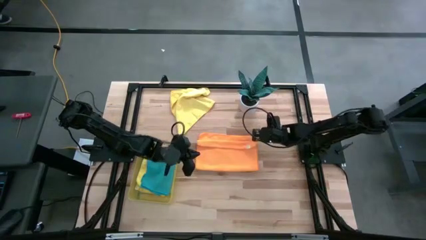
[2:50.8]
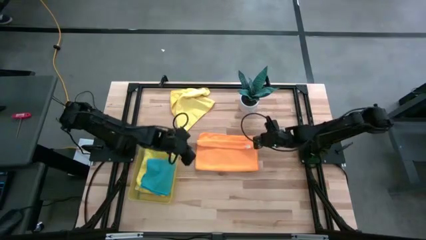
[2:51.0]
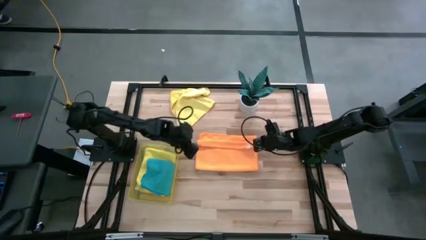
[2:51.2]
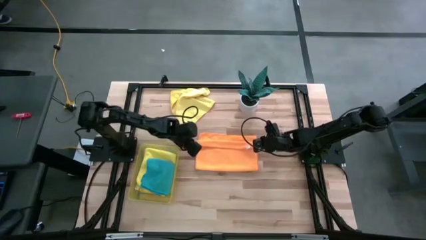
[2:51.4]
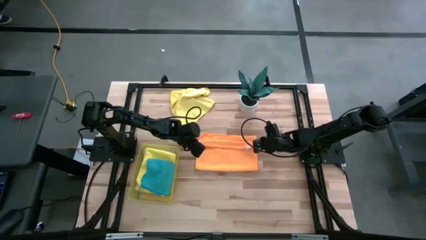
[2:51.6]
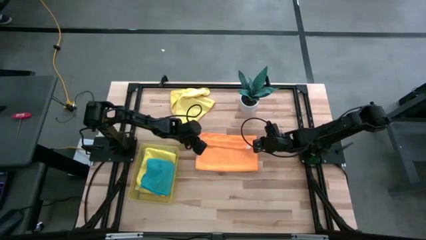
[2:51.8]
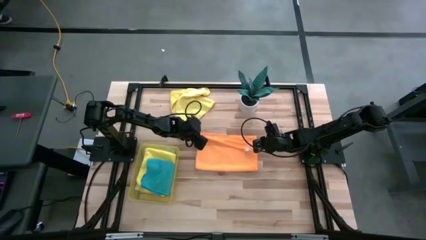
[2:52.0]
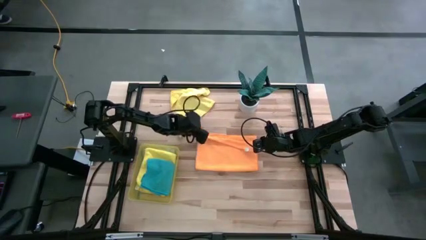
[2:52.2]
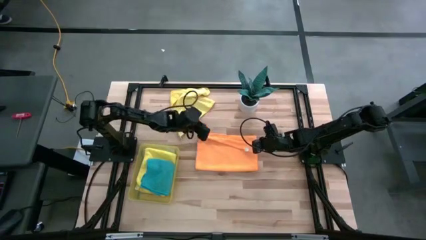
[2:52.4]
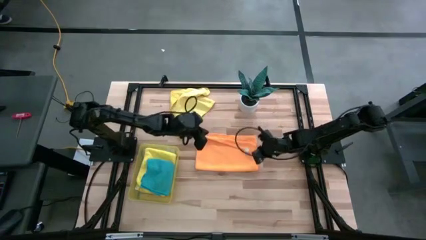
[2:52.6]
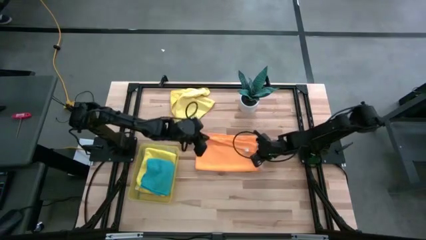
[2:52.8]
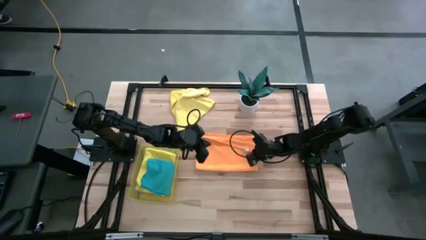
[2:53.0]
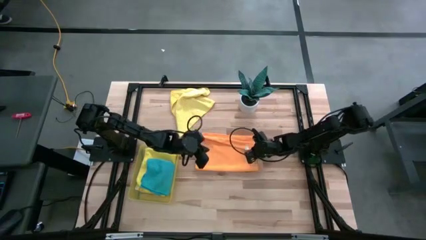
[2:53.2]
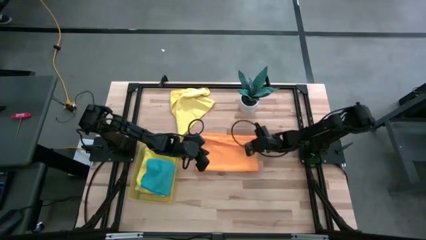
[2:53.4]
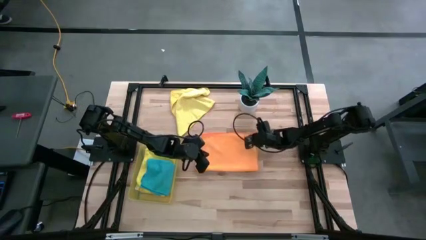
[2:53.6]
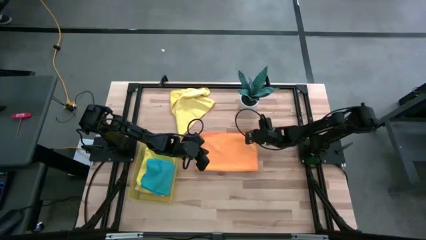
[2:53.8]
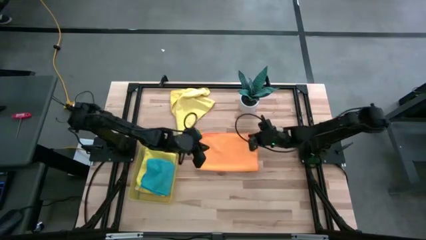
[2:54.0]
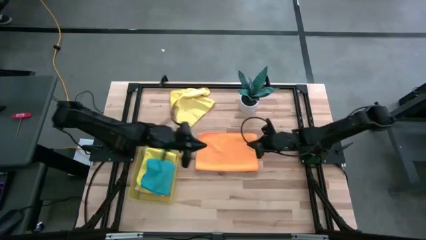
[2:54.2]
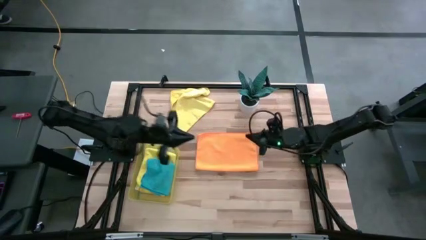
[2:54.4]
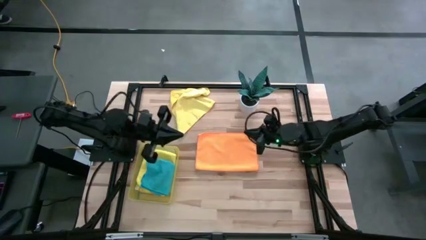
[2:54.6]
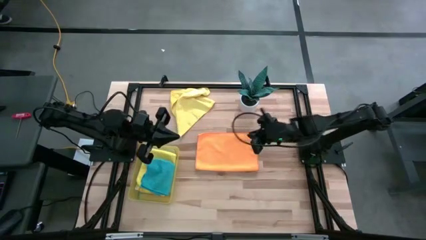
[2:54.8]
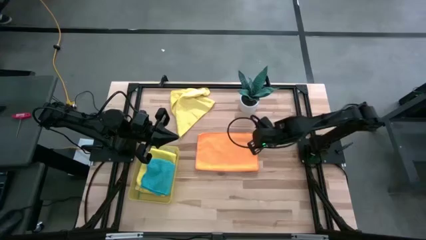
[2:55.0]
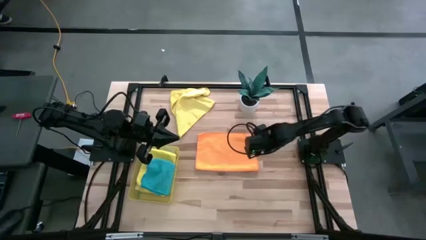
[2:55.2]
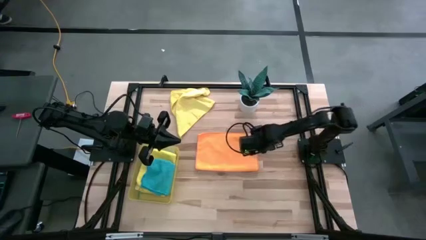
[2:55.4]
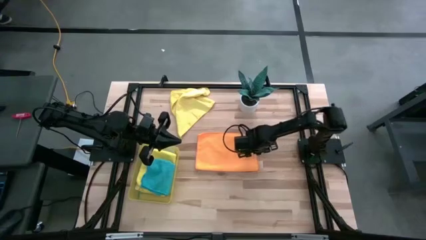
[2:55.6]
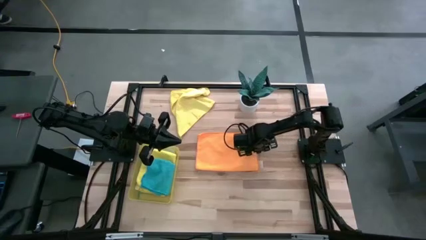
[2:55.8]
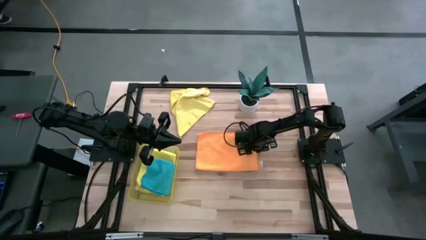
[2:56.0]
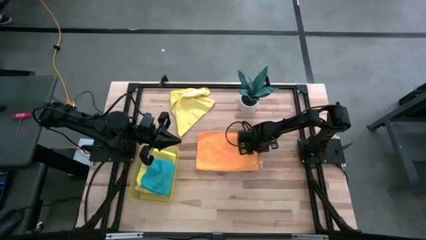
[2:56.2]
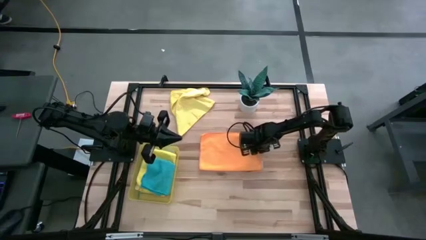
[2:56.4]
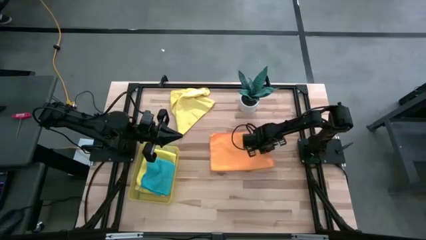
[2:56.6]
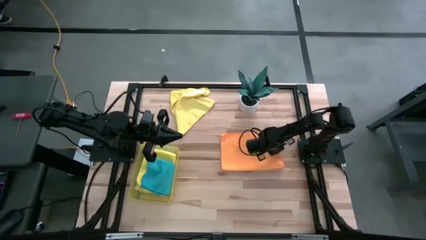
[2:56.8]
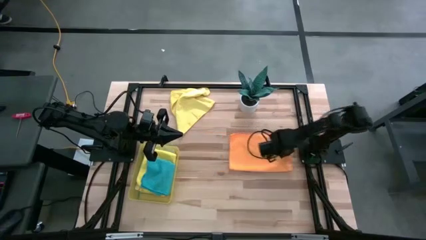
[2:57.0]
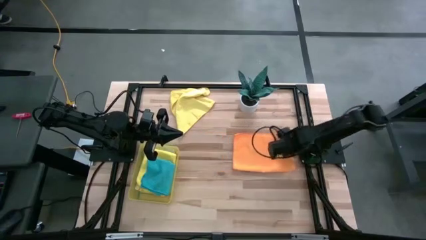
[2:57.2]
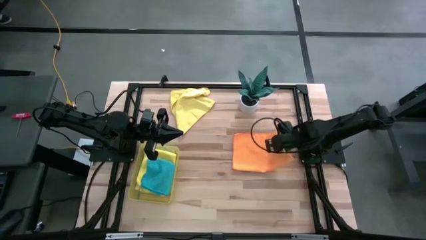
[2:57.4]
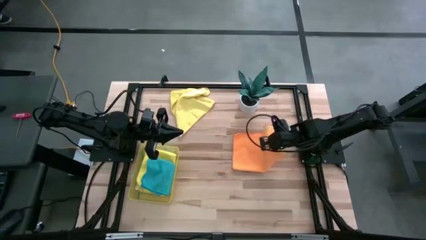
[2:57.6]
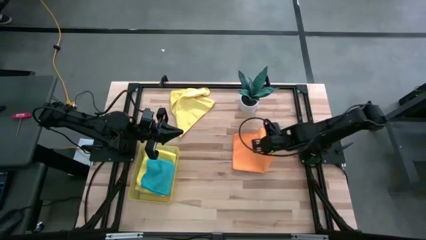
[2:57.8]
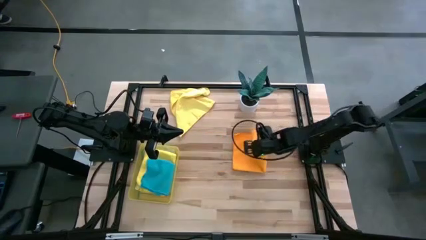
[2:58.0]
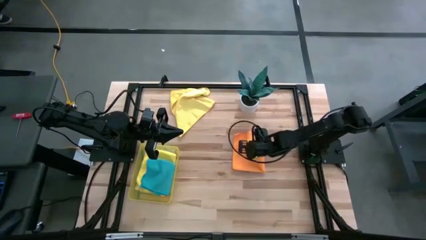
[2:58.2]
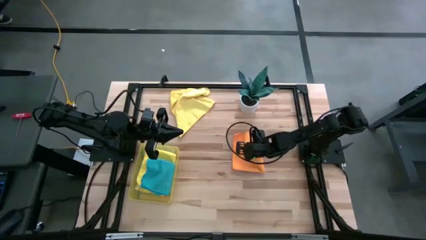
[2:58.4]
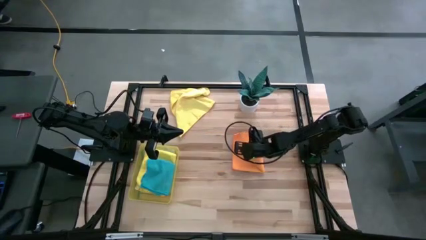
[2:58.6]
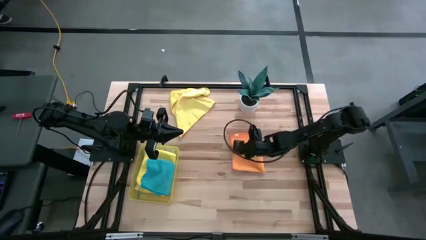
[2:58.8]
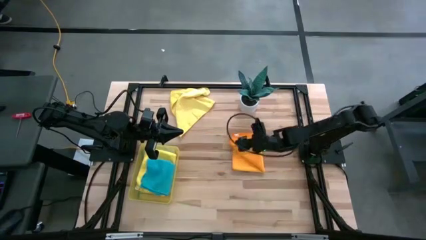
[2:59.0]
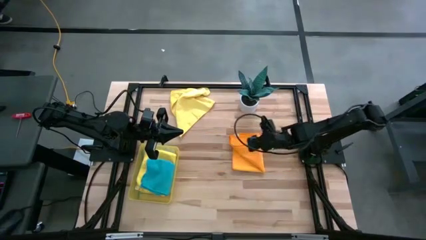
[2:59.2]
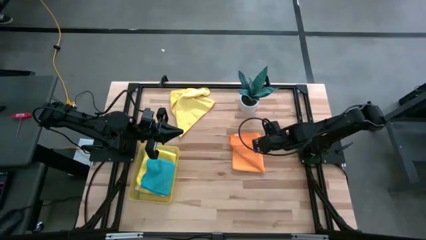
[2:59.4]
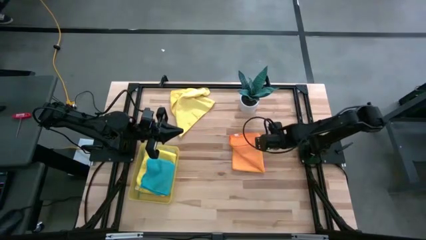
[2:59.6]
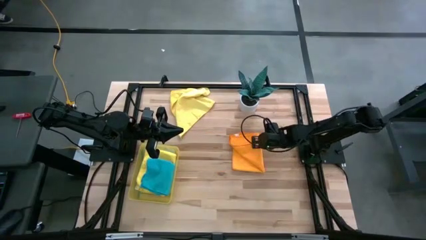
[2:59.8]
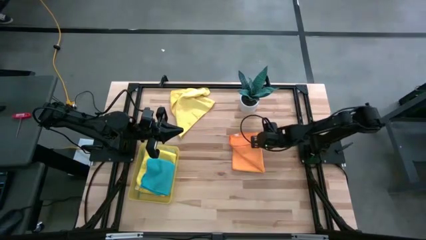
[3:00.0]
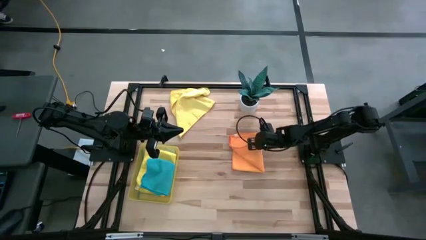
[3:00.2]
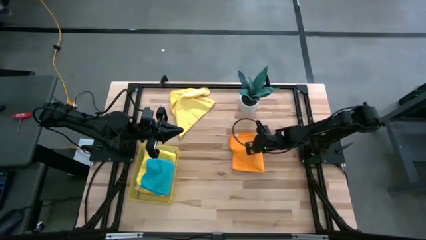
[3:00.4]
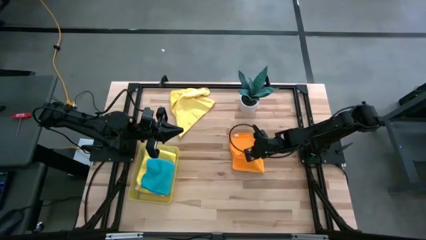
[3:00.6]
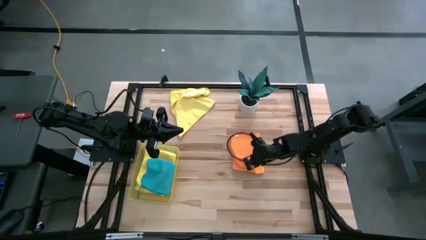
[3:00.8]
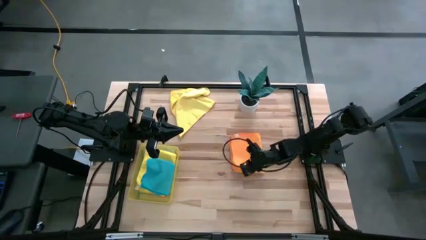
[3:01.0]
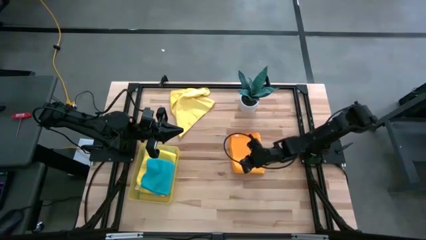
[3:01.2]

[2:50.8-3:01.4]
Task: Fold microfiber towels
Fold the orange microfiber cloth
